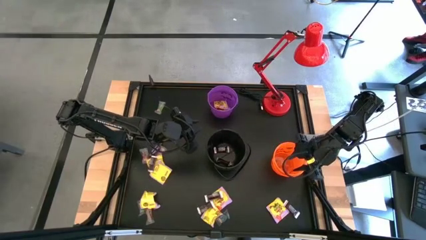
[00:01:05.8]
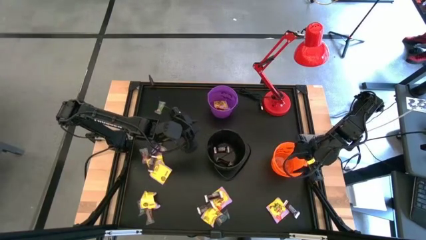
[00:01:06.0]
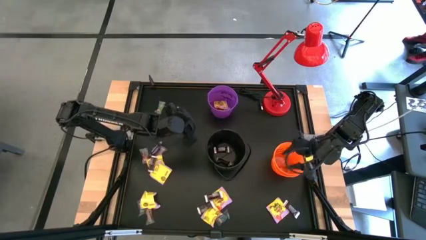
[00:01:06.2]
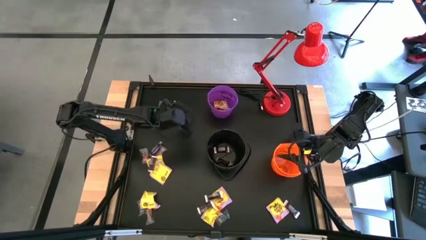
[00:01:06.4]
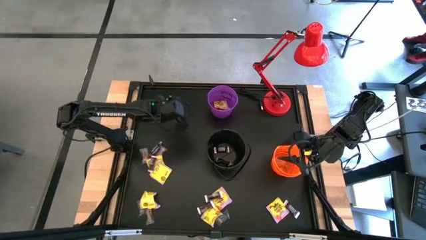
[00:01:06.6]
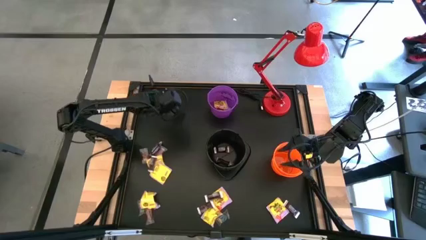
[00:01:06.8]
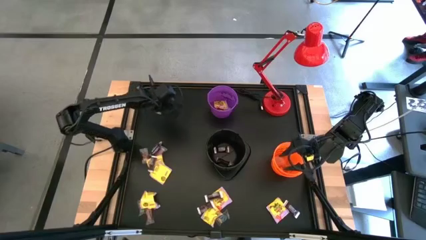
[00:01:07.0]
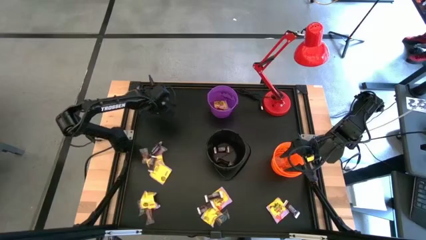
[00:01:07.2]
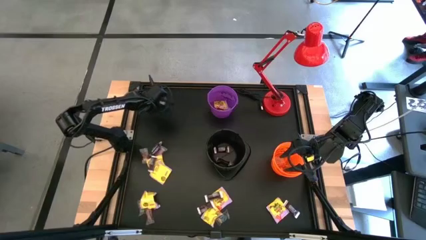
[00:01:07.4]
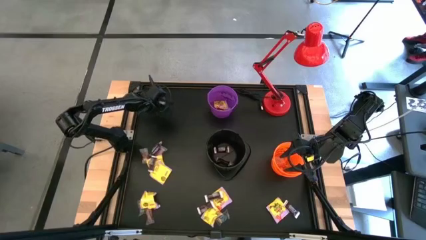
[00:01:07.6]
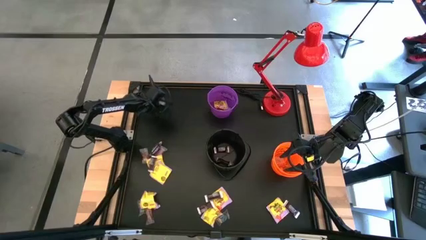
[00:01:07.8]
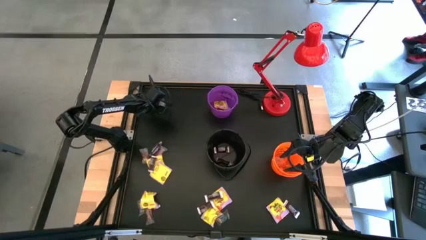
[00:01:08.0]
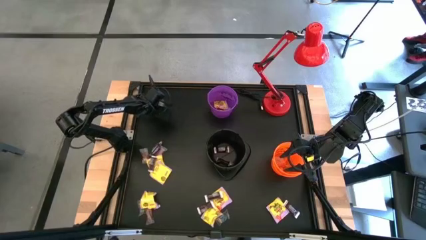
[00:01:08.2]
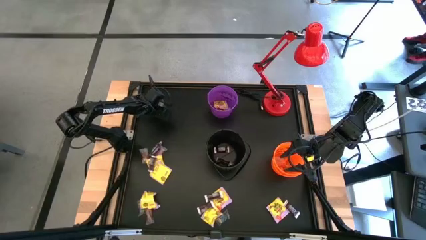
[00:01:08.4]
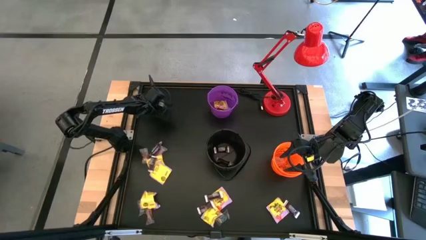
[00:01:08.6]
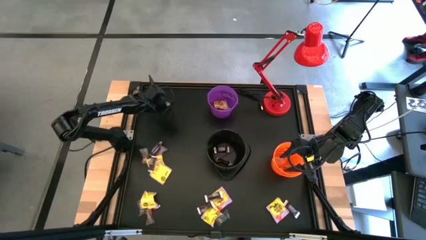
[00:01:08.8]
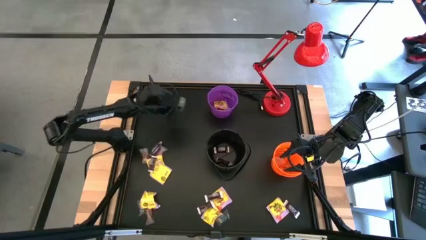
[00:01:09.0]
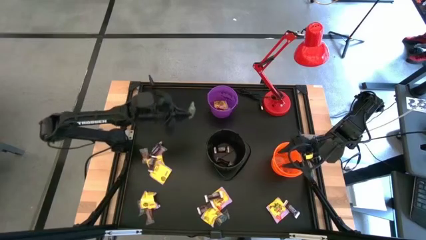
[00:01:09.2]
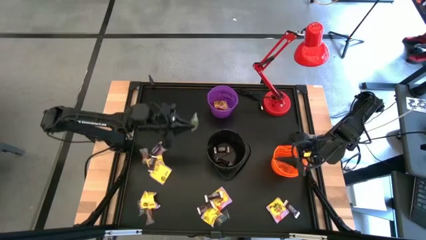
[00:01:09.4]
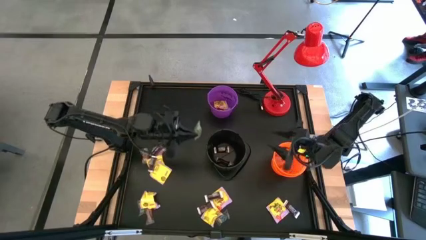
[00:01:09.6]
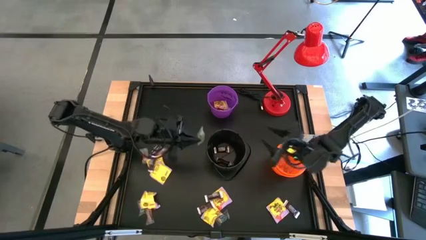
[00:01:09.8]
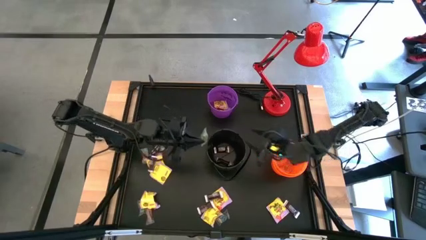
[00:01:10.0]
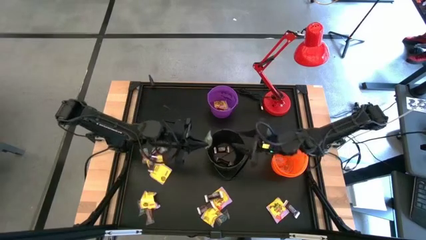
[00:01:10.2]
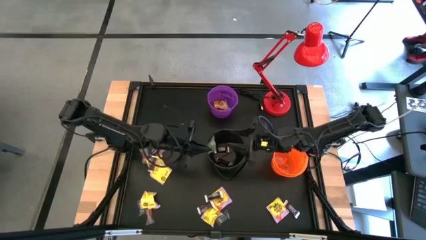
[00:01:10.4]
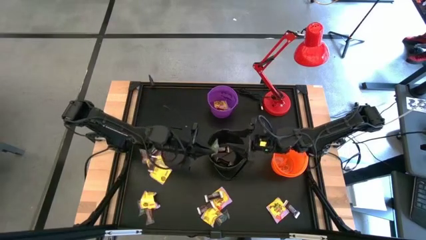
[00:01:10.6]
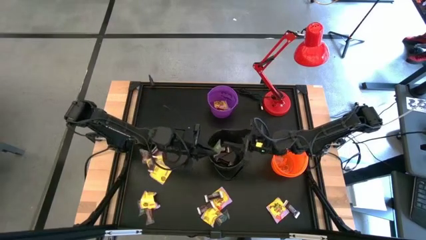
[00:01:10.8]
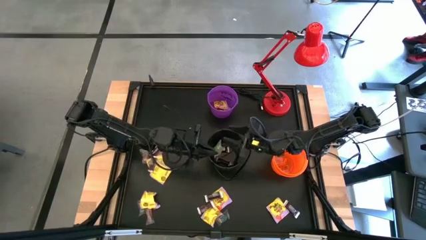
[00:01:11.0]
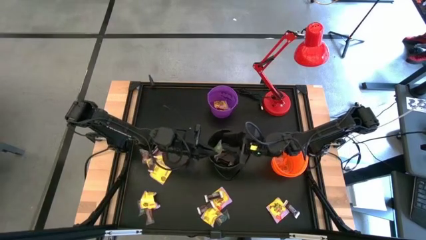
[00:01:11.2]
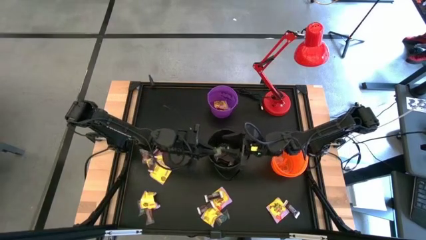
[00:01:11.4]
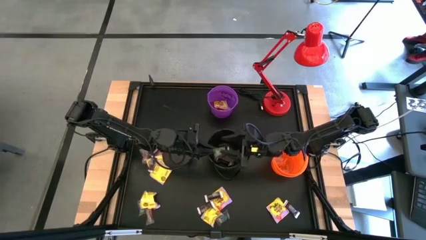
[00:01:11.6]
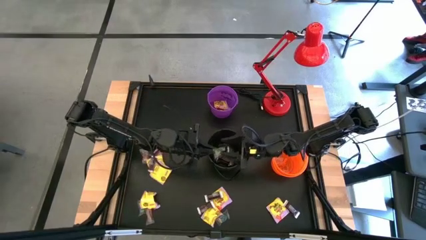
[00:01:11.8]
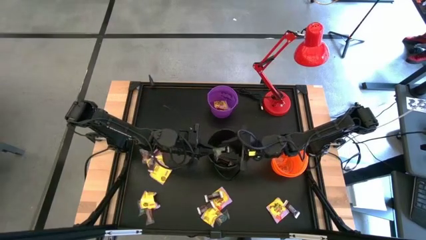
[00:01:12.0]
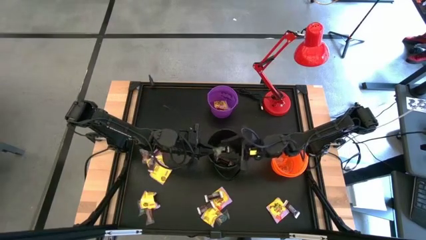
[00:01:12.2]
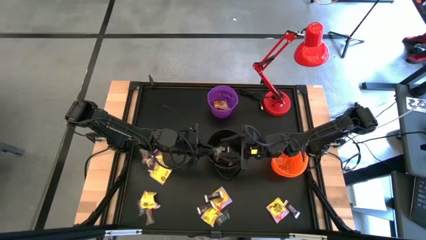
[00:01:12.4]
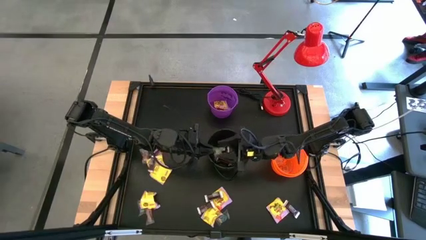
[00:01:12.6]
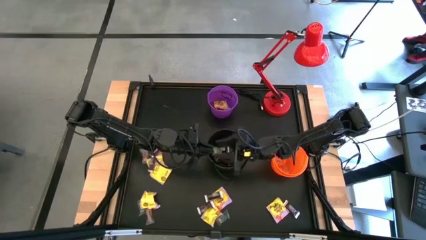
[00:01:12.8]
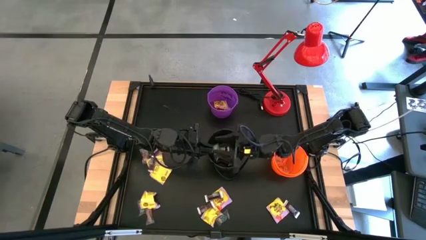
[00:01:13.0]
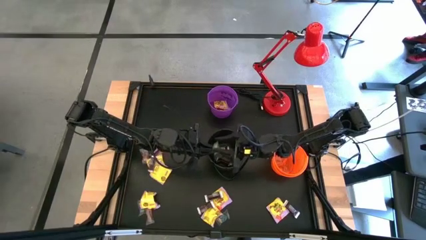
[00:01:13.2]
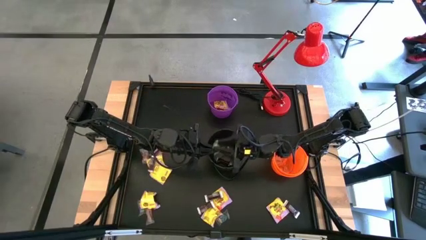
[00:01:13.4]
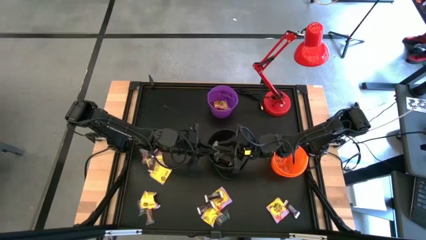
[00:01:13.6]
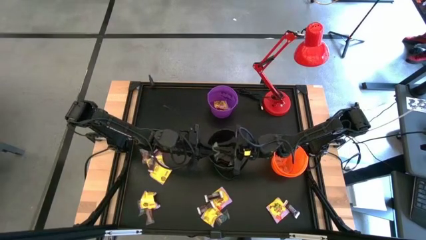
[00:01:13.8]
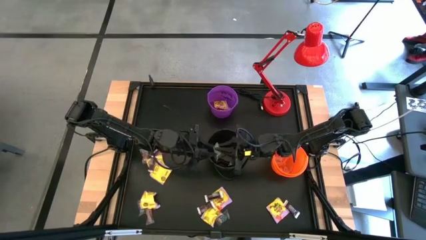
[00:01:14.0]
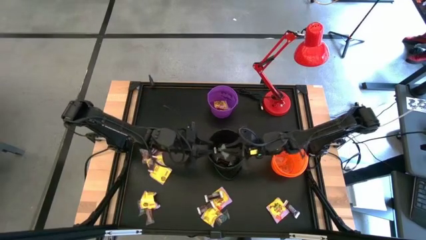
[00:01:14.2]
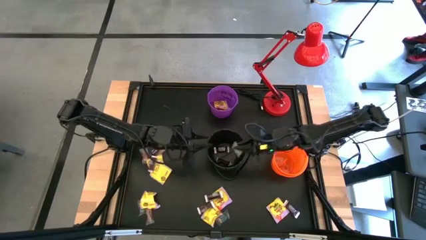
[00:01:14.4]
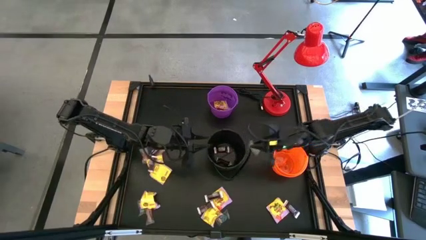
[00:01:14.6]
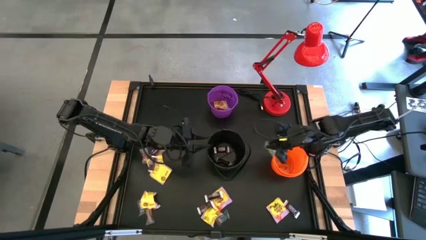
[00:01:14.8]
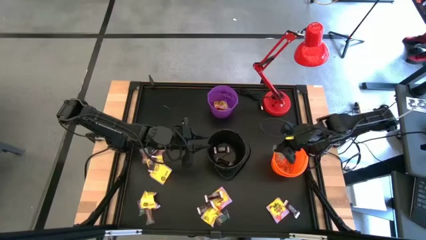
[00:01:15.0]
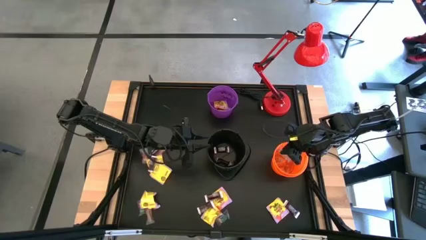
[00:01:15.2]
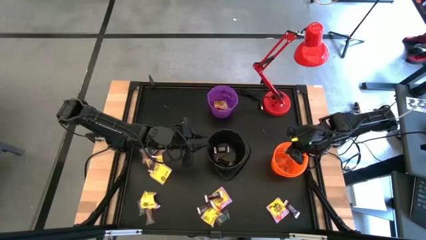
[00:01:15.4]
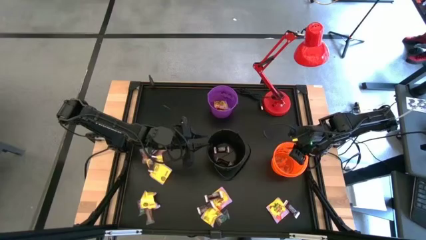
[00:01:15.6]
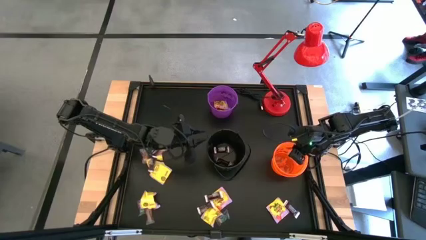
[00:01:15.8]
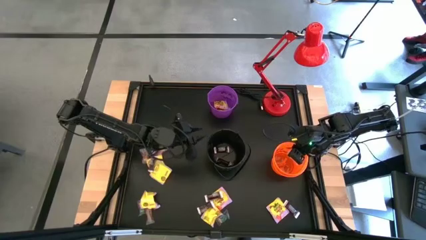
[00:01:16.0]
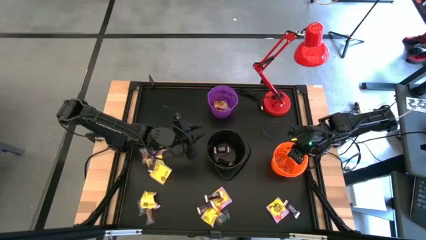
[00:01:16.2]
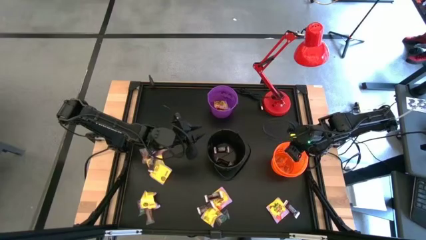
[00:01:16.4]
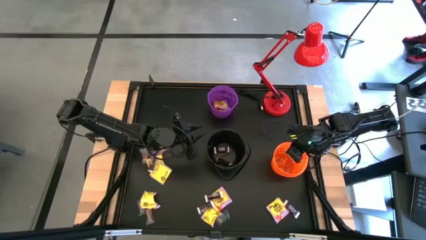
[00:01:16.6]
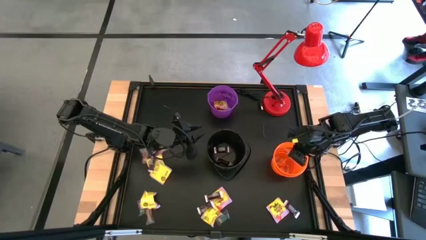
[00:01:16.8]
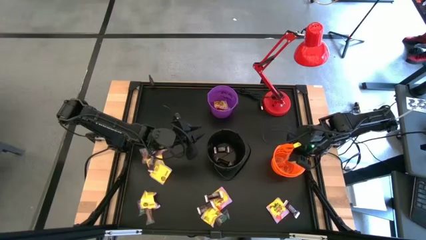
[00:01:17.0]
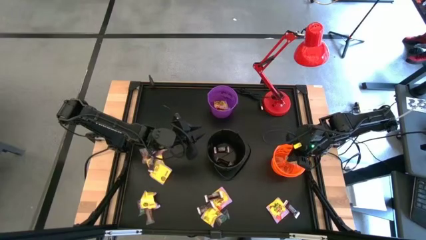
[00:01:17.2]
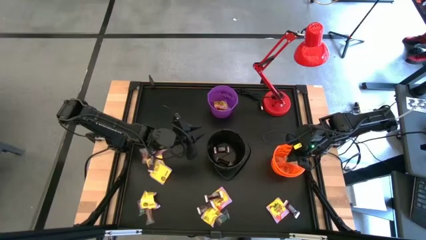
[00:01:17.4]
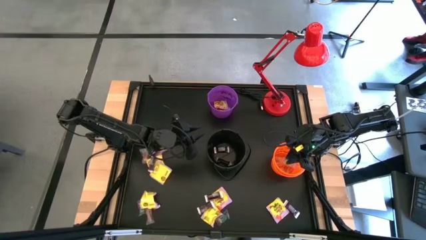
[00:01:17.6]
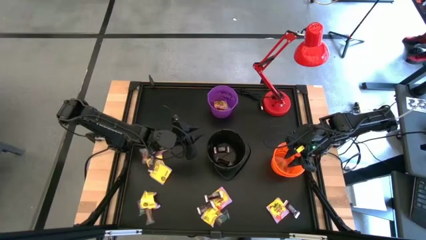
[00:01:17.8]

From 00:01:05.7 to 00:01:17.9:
Task: Sort candy
Put the green gummy into the orange bucket

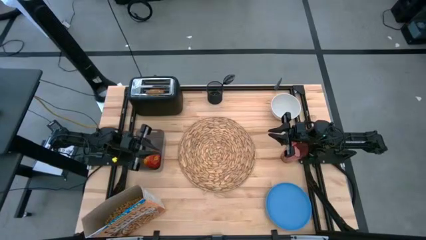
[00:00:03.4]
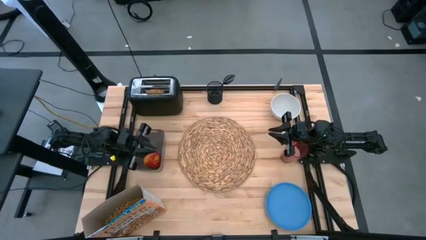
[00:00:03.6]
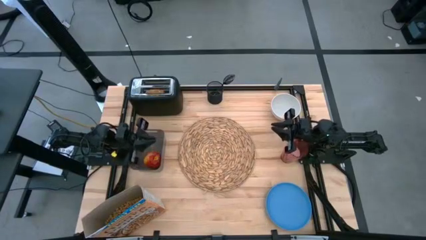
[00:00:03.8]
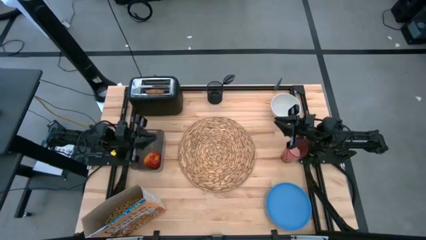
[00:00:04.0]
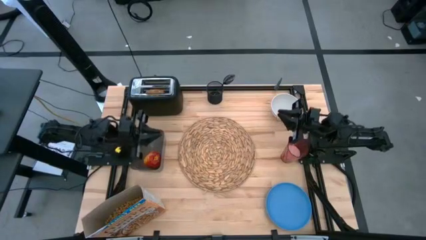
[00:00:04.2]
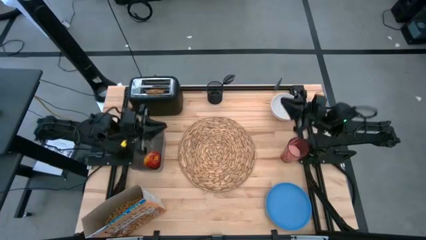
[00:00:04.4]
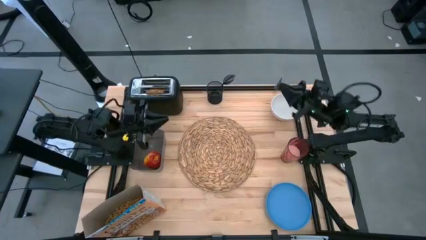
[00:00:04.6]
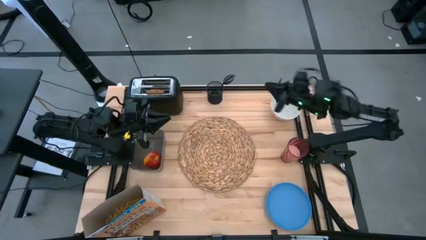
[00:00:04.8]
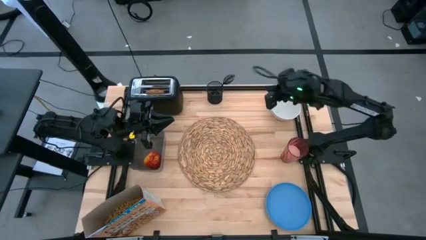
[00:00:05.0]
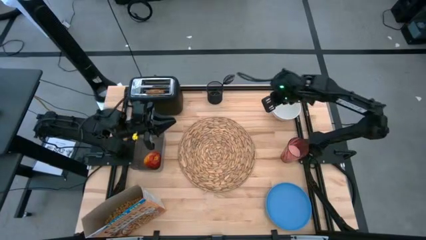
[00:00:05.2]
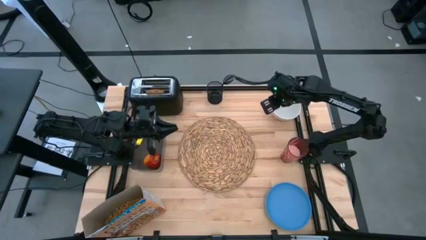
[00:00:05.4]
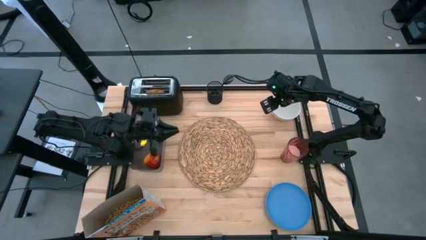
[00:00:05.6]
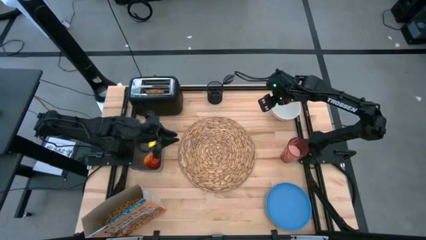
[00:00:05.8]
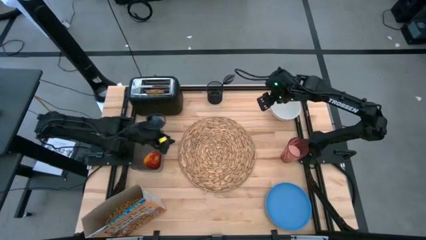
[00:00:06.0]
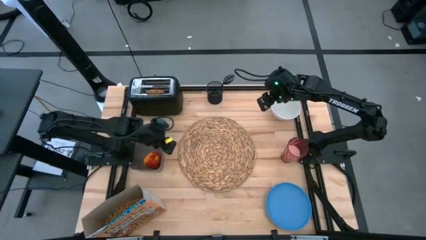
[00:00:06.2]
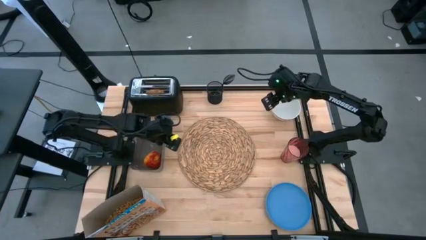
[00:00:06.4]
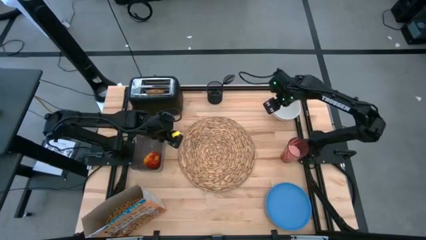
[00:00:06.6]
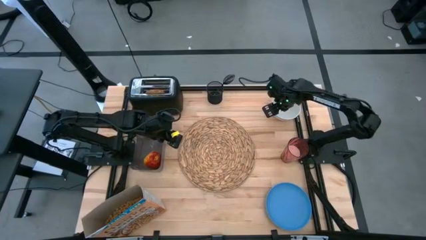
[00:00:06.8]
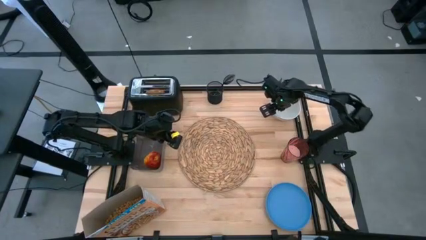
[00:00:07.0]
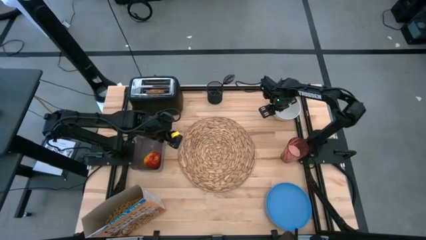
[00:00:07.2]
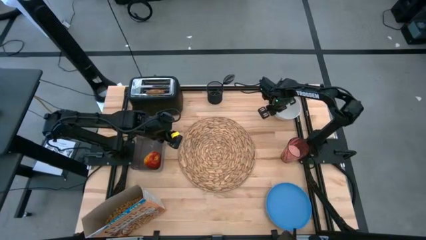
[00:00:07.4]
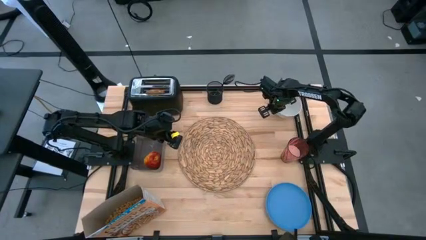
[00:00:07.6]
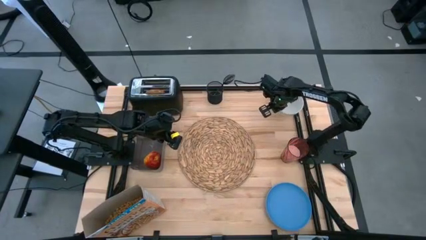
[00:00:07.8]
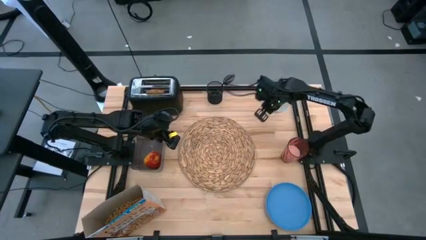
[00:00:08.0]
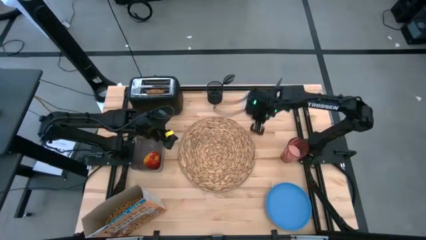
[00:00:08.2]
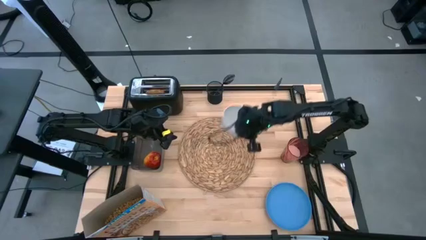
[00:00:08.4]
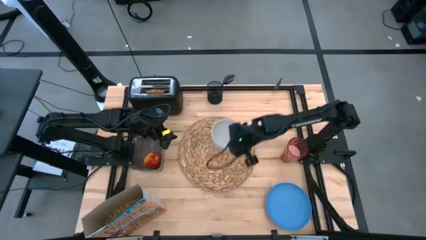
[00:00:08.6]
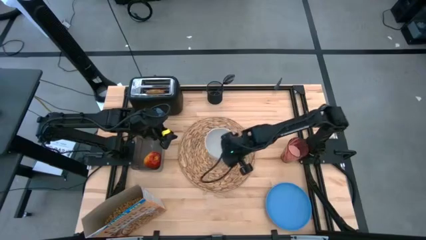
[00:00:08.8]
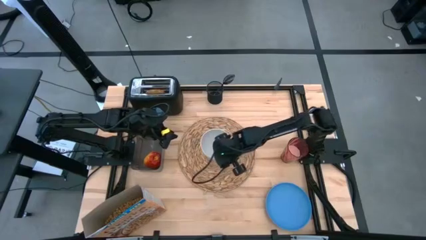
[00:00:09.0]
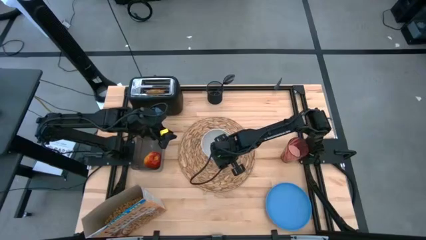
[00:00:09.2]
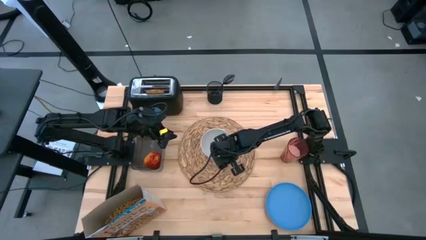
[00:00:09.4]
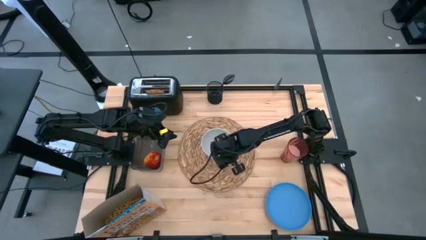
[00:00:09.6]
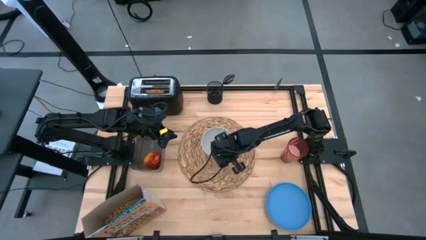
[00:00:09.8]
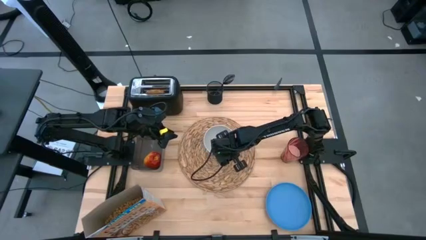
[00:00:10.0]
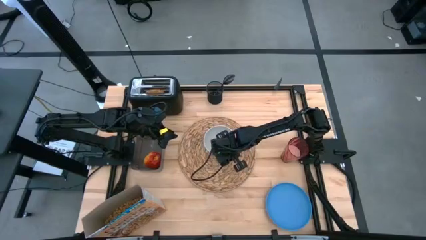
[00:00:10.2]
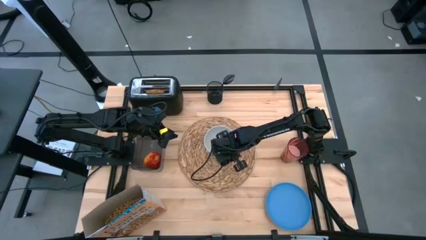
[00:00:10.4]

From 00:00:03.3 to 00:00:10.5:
Task: Arrange a breakfast setting
Put the white bowl on the brown placemat
